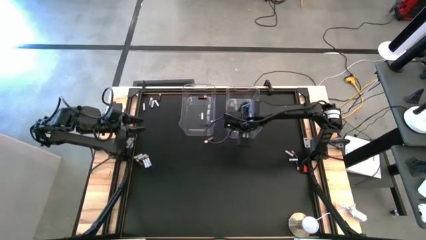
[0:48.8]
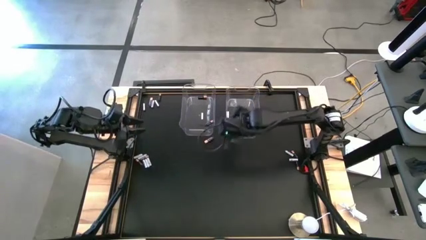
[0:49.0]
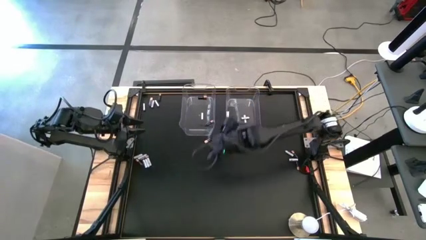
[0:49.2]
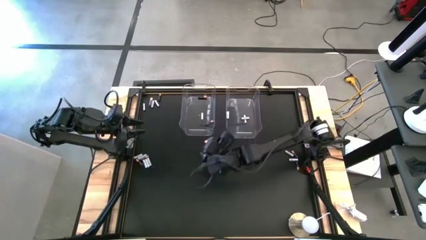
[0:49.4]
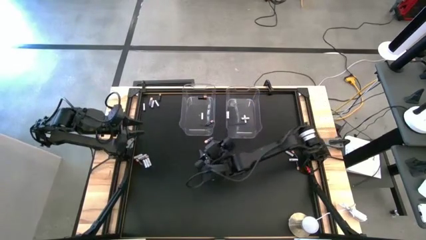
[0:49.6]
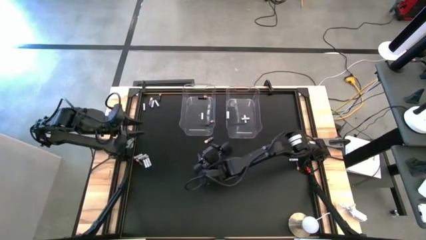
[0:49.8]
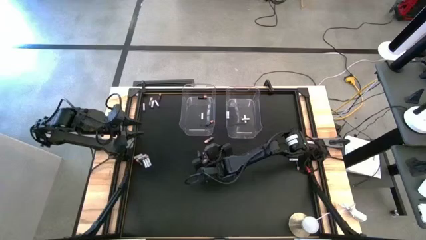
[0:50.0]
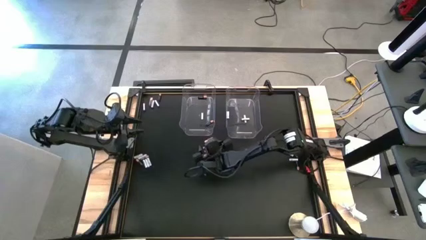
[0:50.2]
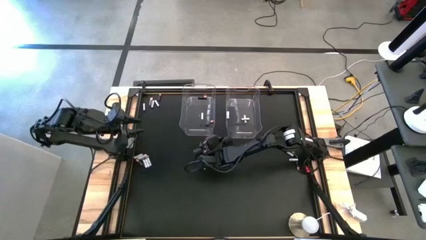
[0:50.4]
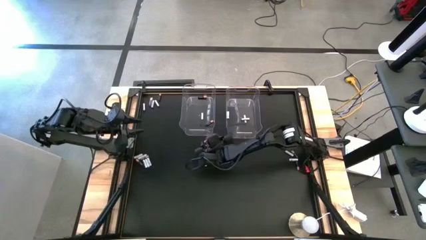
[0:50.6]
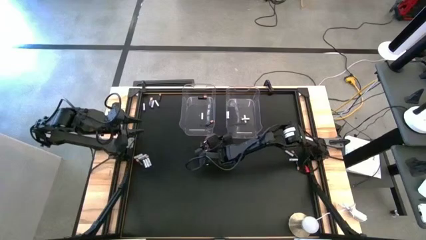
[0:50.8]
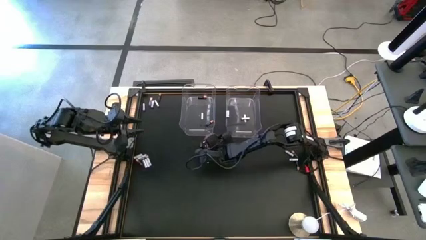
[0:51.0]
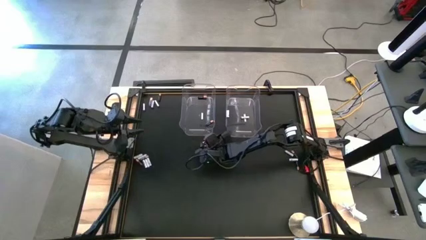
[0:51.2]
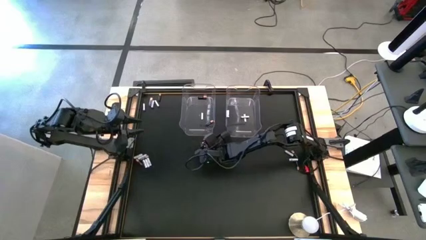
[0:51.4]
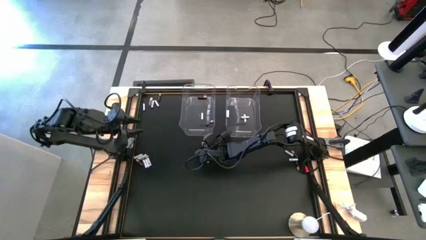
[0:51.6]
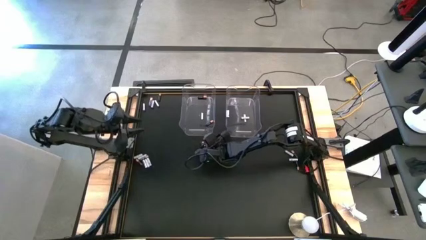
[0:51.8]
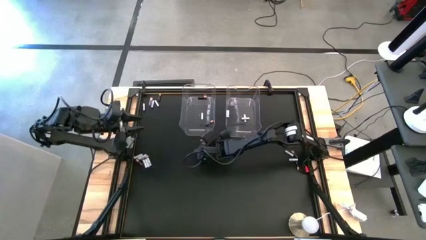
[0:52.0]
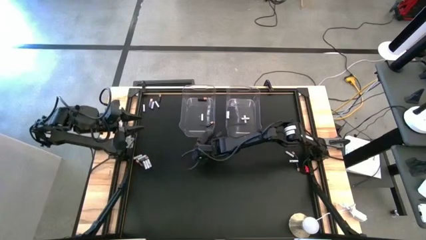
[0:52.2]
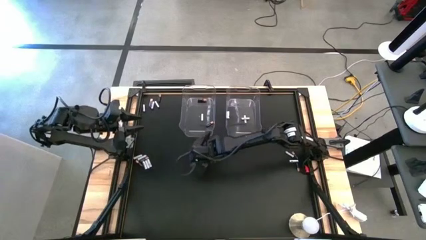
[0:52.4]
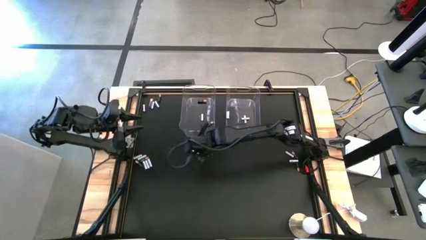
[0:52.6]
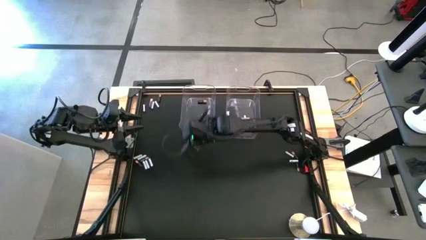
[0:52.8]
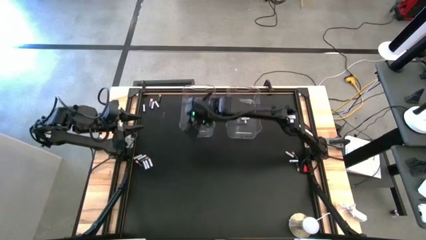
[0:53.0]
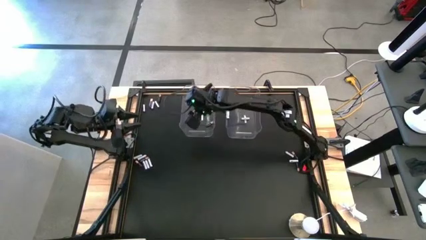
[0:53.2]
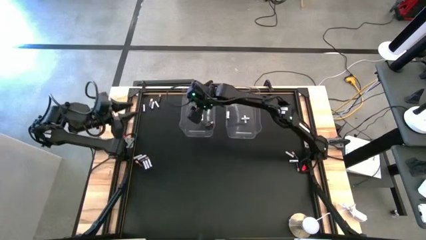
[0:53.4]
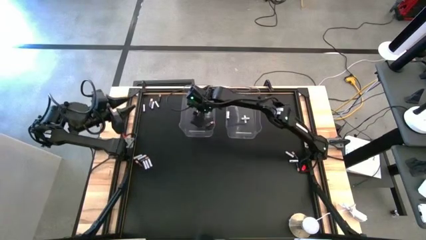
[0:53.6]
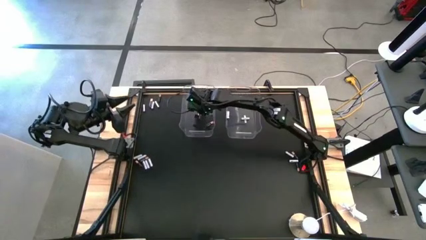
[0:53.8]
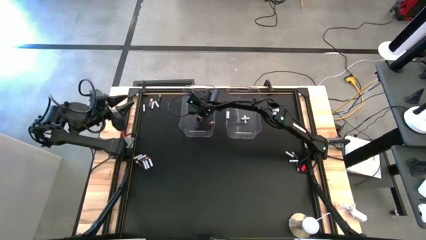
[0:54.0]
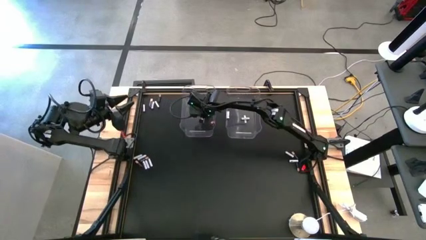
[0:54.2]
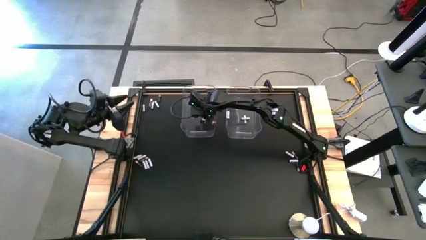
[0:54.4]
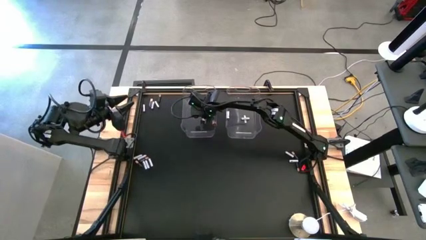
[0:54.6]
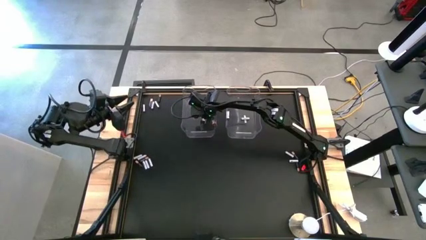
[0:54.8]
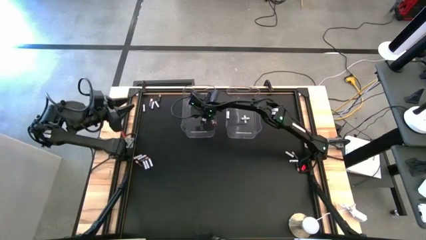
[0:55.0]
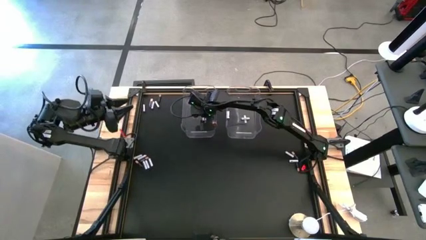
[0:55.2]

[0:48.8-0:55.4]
Task: Sort batteries
Put the black battery into the right transparent bin

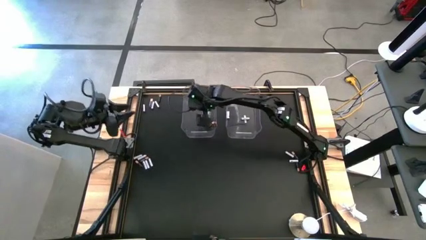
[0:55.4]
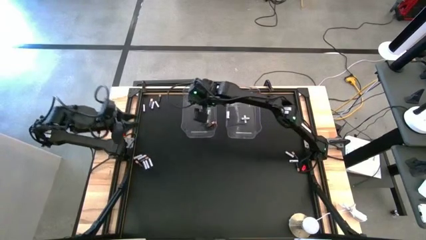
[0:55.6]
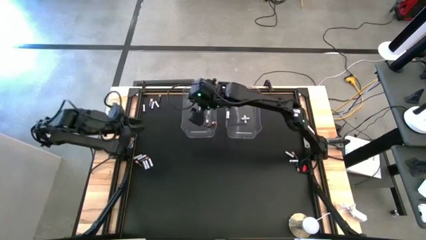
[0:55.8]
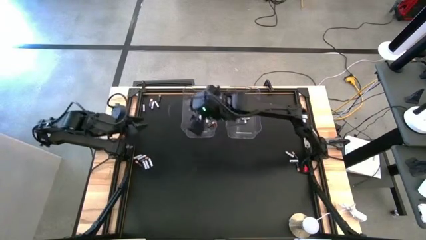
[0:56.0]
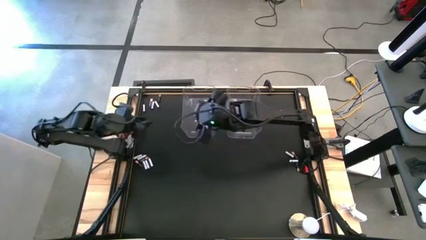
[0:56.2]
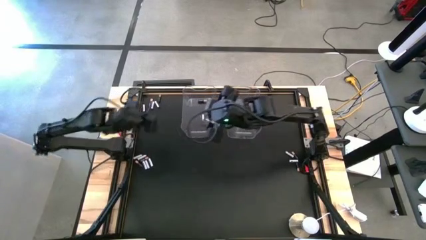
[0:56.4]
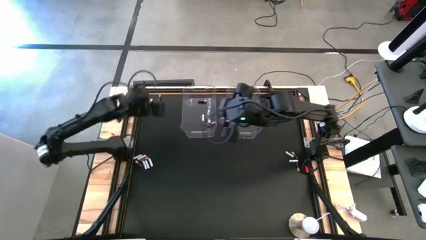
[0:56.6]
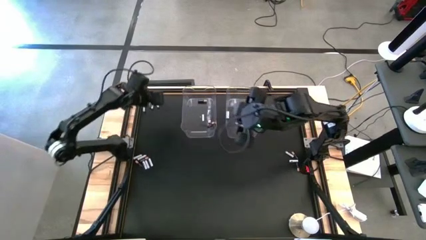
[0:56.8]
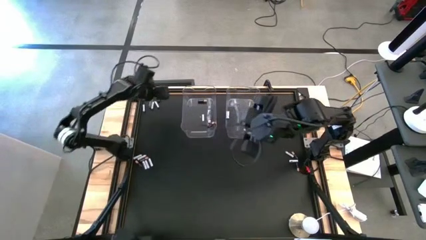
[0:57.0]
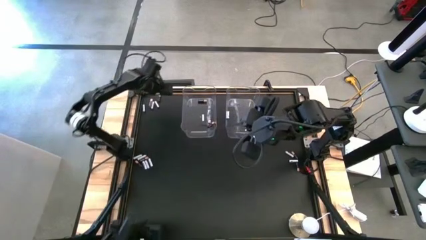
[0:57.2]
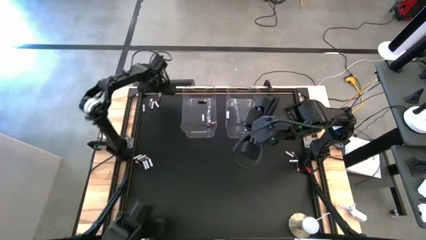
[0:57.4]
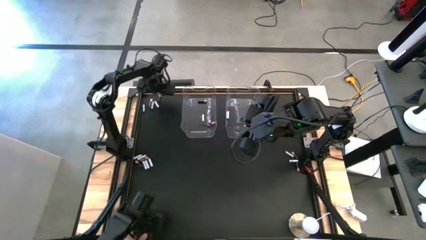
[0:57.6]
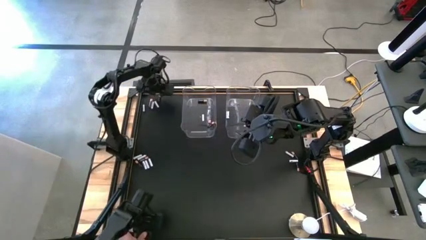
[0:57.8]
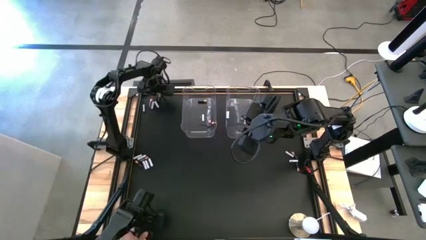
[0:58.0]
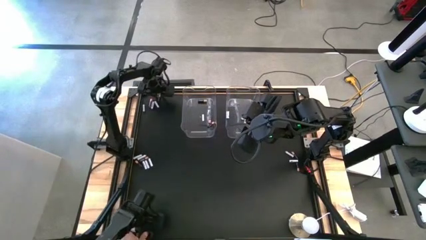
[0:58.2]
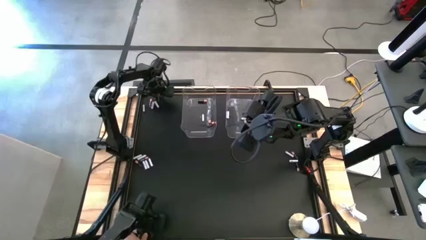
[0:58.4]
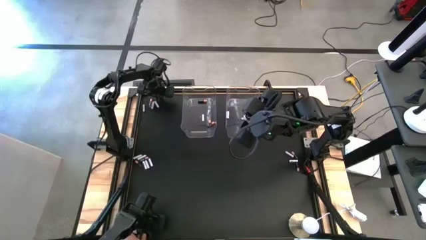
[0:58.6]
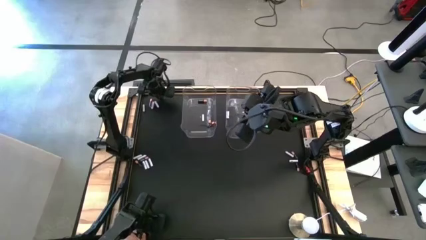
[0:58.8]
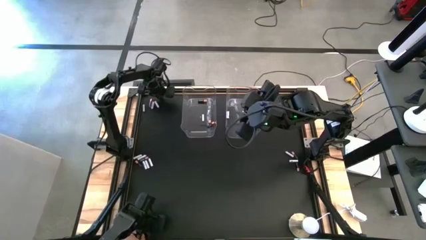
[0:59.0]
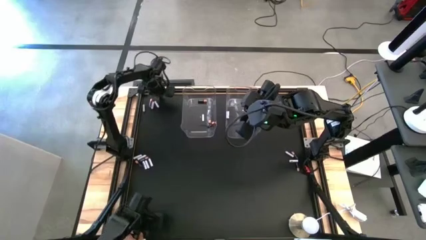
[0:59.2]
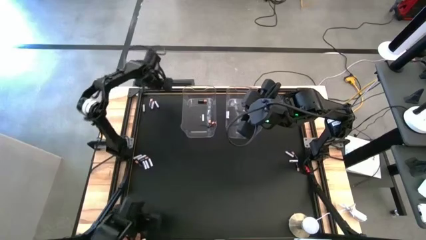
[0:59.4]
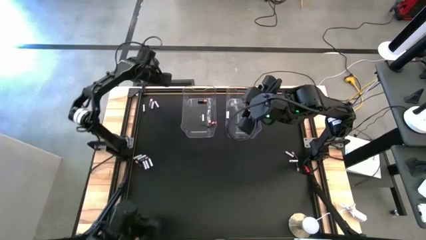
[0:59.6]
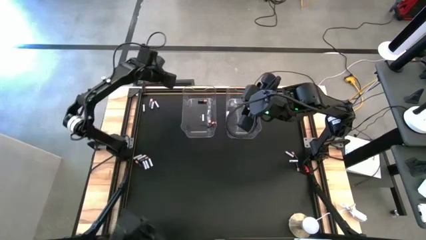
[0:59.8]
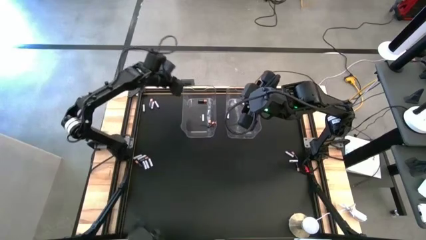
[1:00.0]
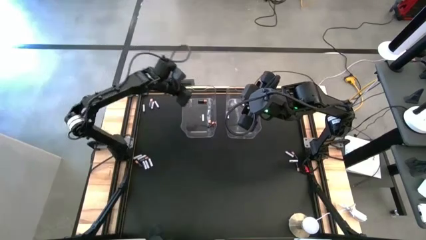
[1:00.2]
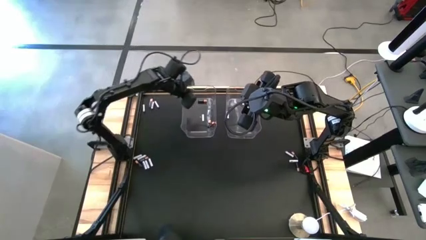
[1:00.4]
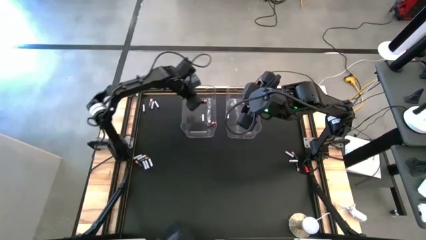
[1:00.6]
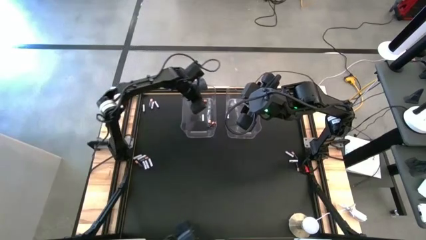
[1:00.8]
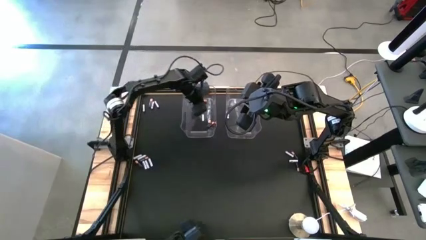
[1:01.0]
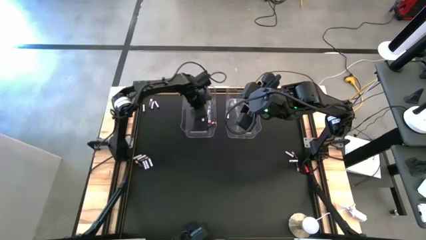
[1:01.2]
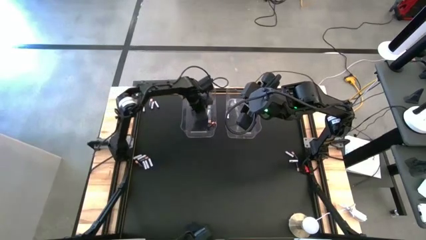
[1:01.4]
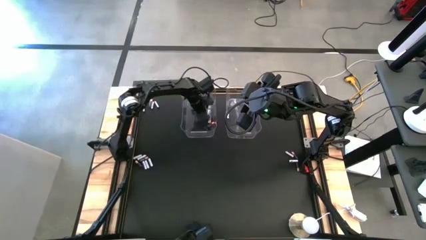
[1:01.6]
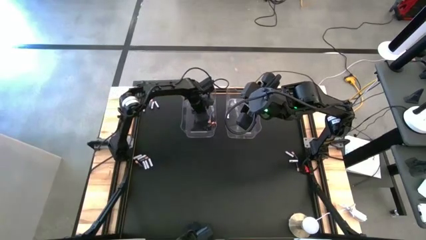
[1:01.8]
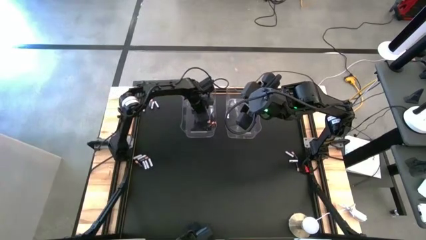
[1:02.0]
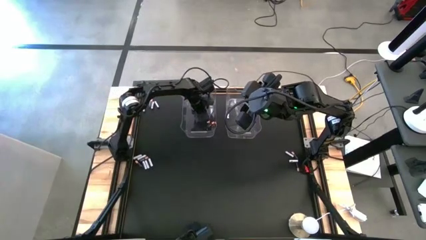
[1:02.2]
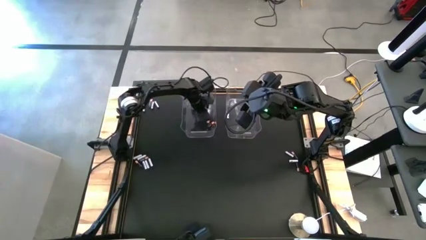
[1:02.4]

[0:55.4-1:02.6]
Put the black battery into the left transparent bin

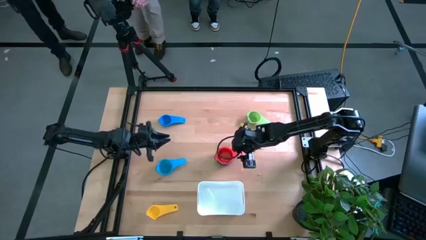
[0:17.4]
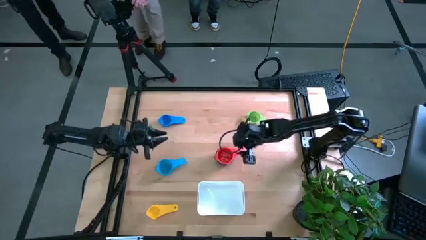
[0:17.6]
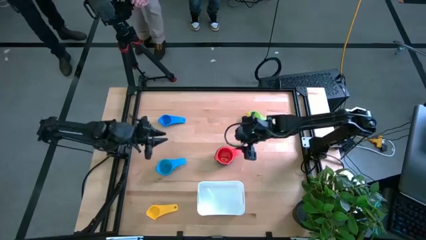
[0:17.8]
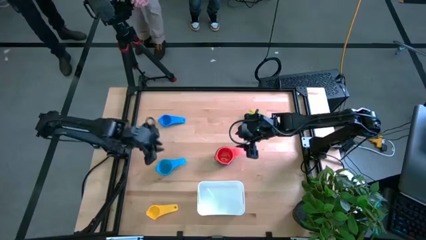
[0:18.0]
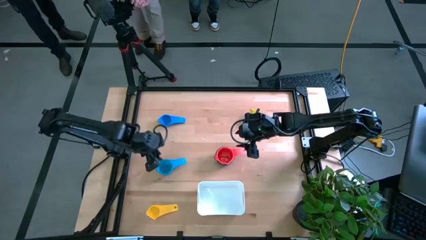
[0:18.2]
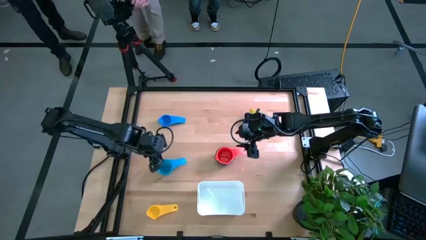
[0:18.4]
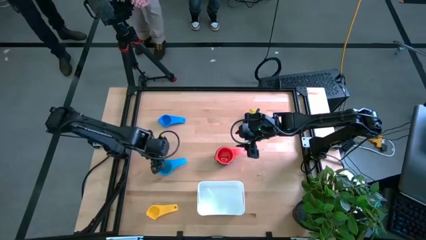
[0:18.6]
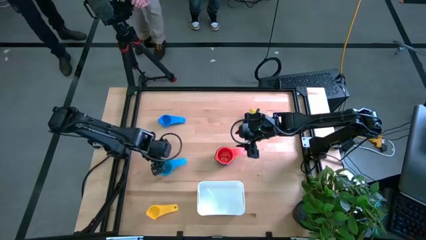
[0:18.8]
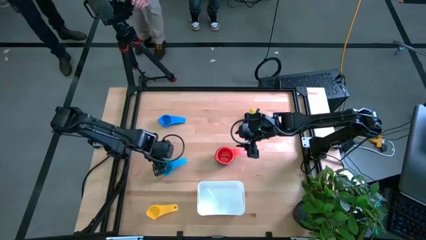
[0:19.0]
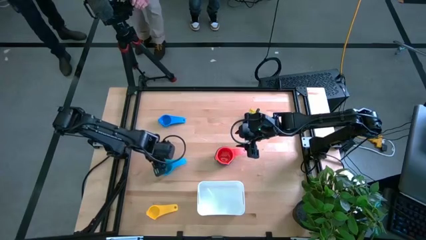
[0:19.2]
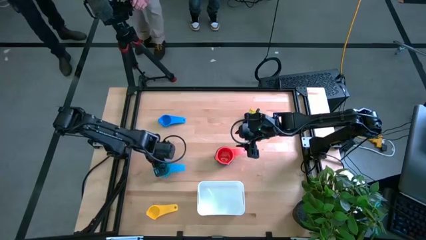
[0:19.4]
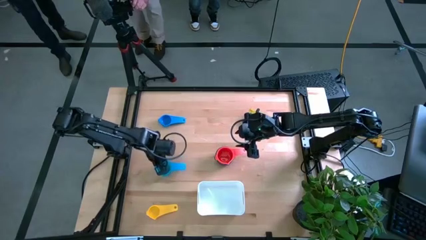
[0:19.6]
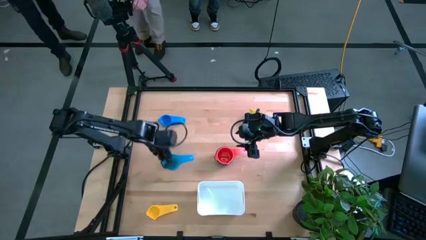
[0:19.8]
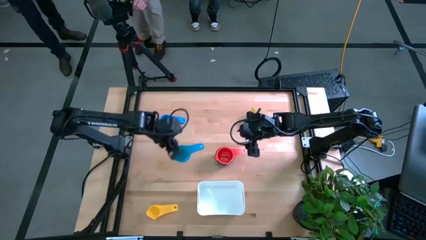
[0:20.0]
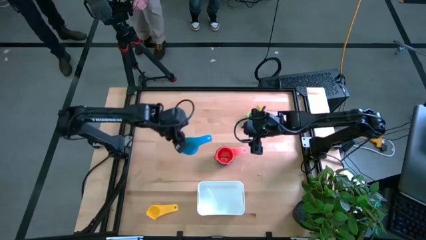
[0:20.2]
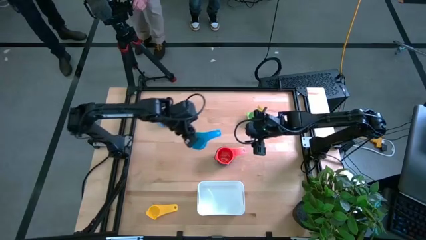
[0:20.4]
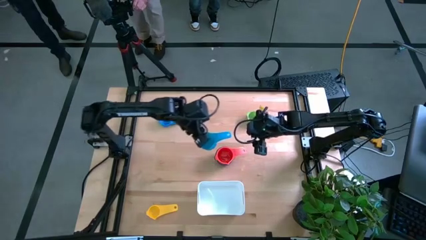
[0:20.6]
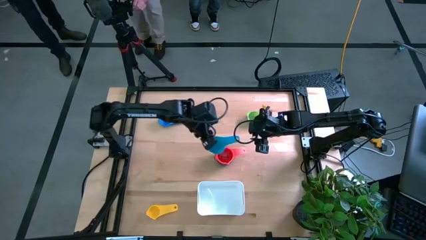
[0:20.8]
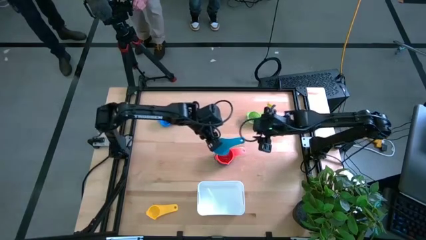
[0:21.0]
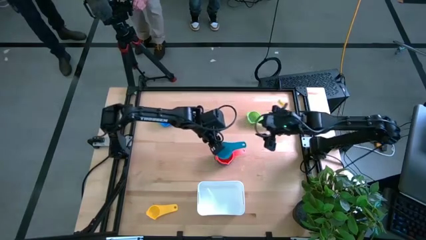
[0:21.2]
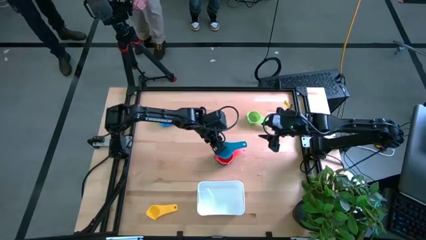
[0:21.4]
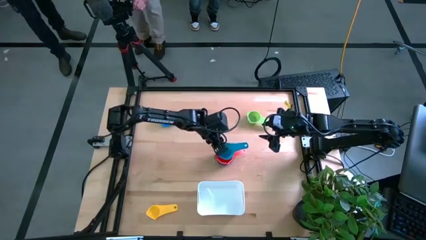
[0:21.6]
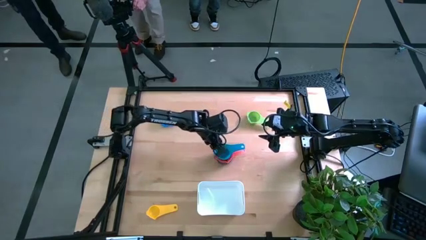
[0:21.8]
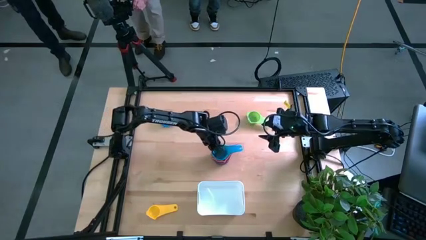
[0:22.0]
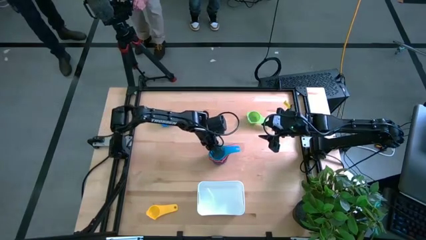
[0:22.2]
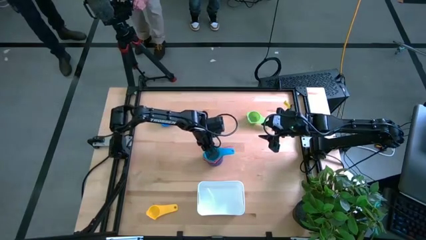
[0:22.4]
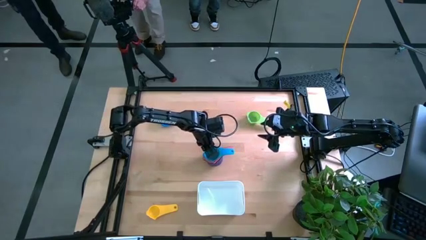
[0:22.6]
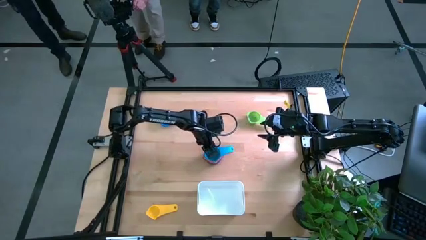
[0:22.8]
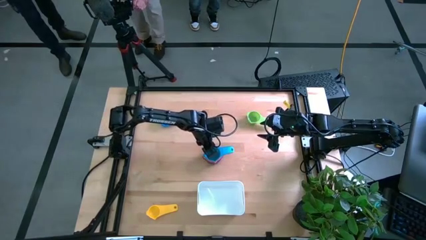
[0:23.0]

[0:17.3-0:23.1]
Task: Nest measuring cups in basket
Stack the light blue measuring cup on the red measuring cup
